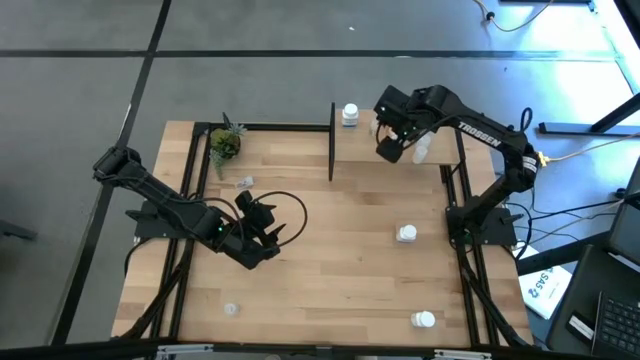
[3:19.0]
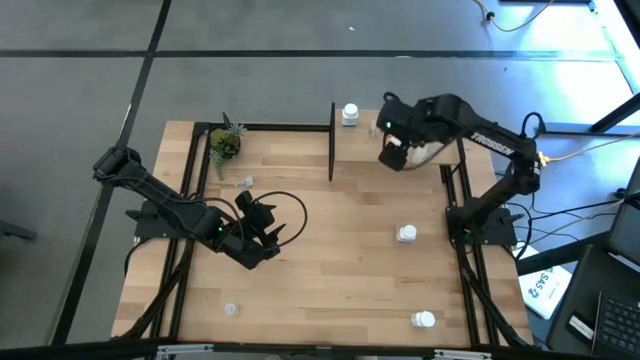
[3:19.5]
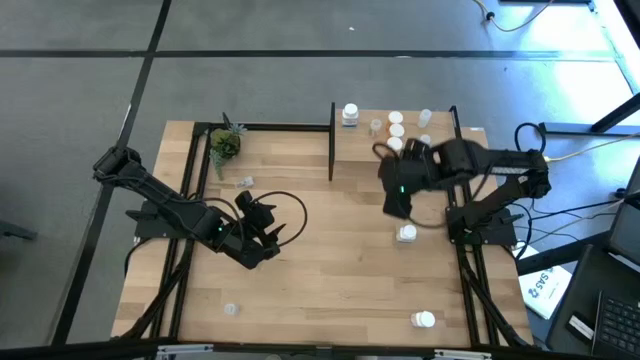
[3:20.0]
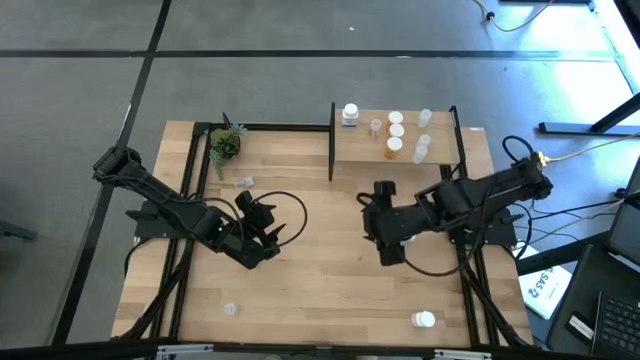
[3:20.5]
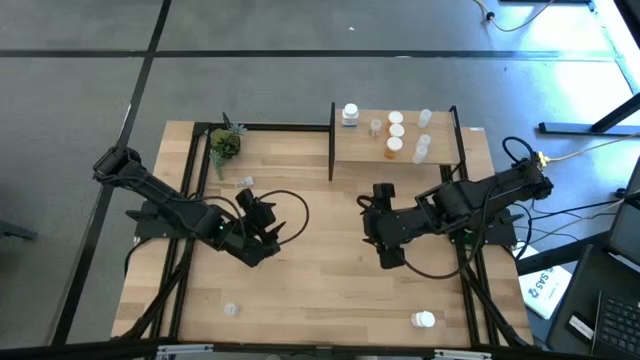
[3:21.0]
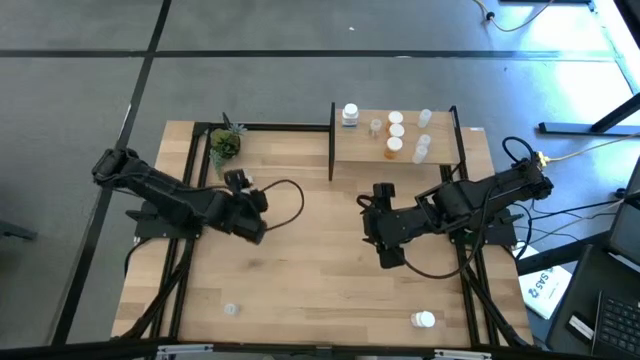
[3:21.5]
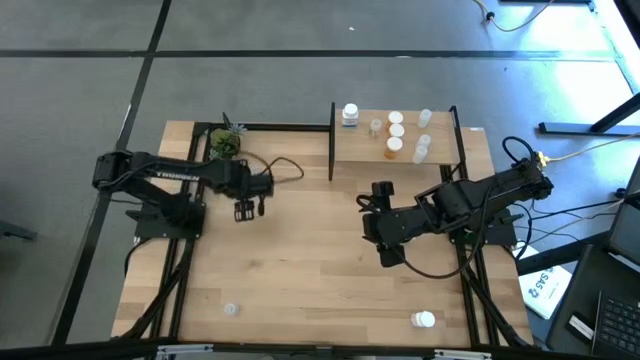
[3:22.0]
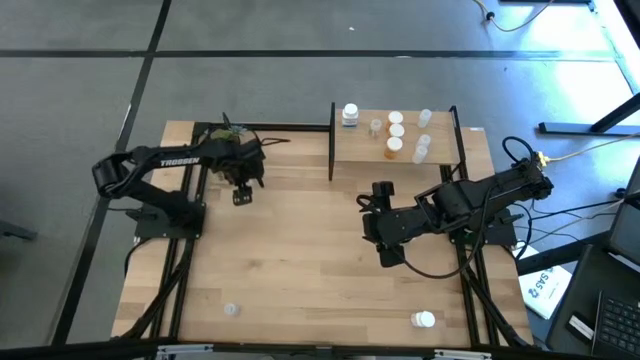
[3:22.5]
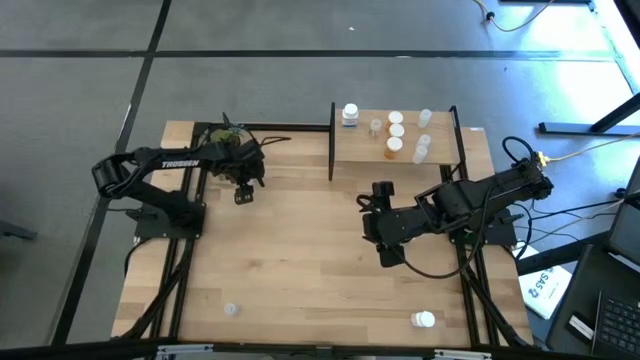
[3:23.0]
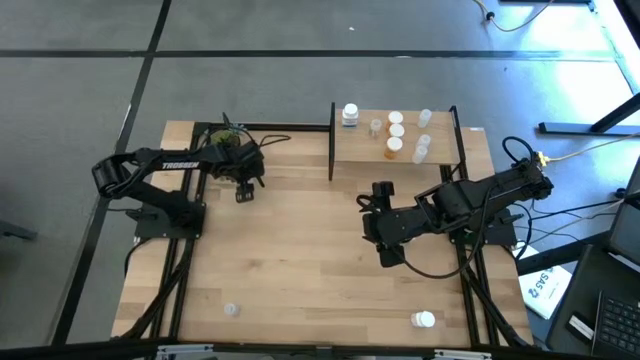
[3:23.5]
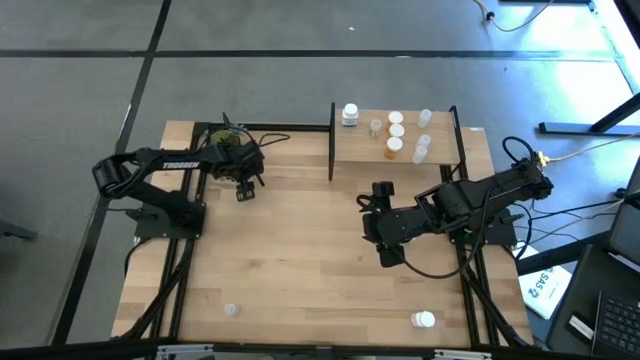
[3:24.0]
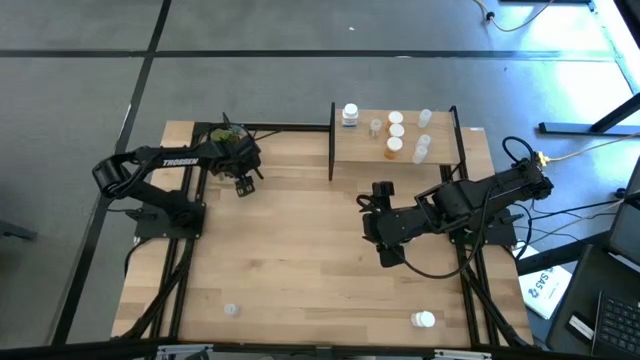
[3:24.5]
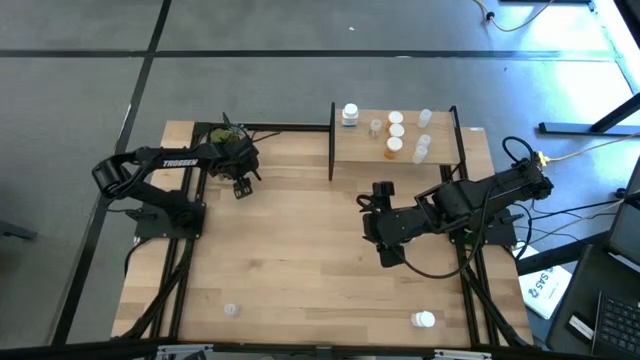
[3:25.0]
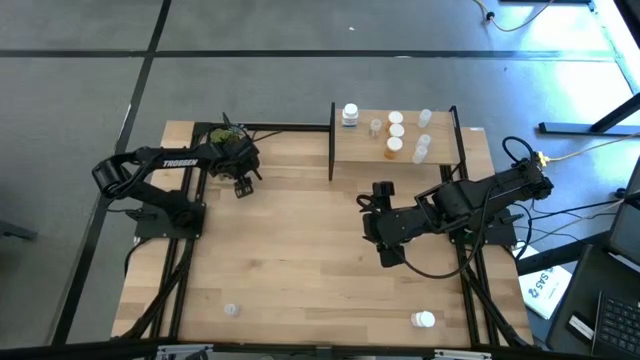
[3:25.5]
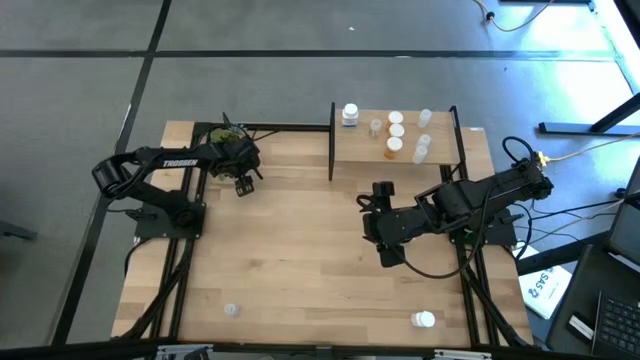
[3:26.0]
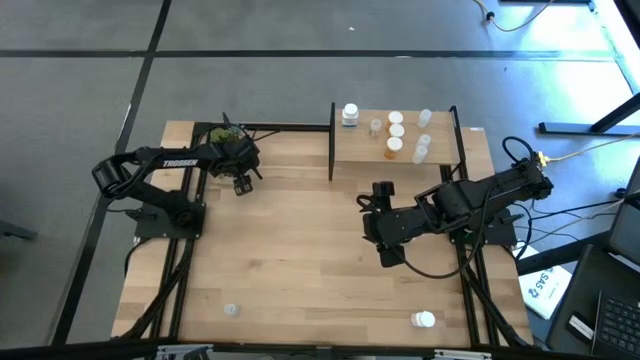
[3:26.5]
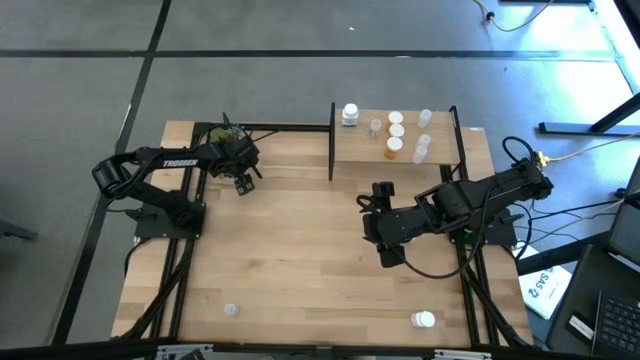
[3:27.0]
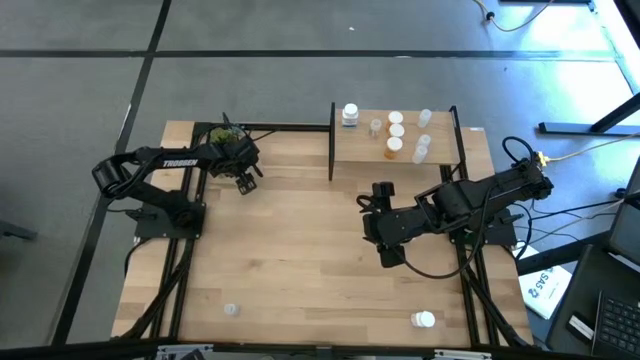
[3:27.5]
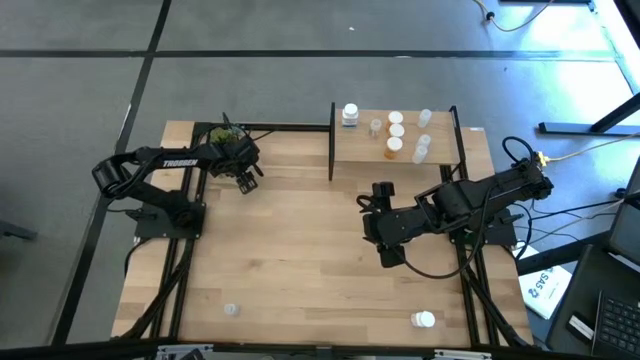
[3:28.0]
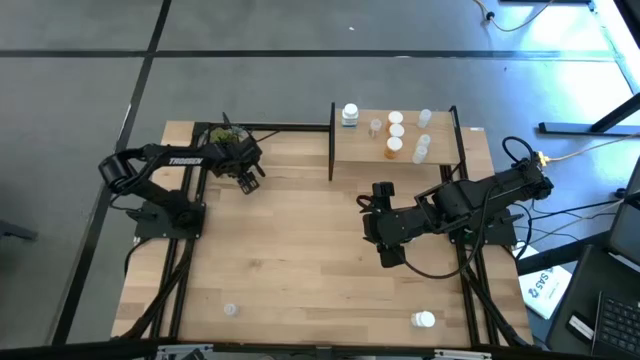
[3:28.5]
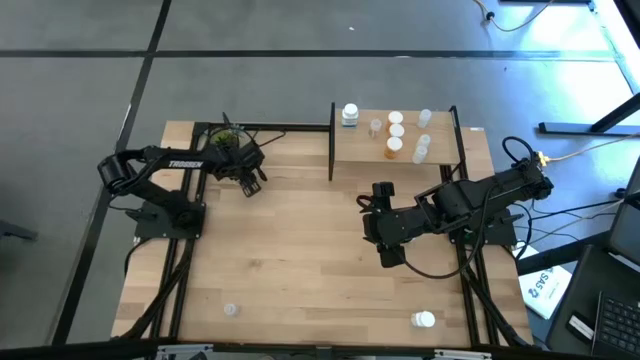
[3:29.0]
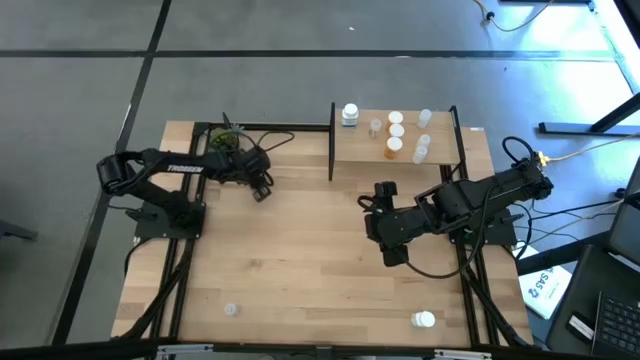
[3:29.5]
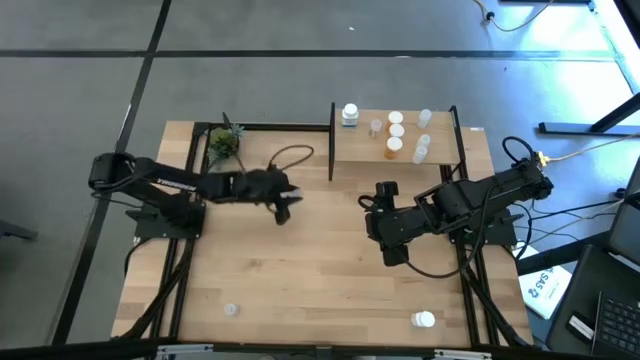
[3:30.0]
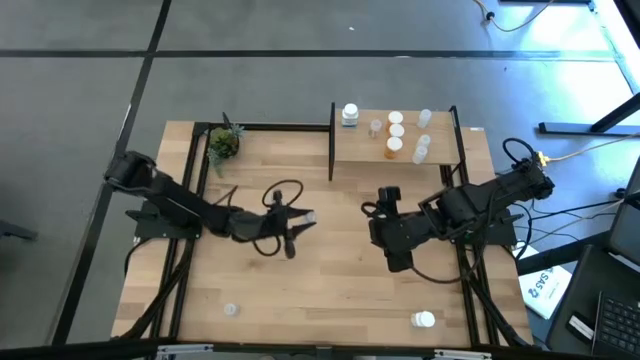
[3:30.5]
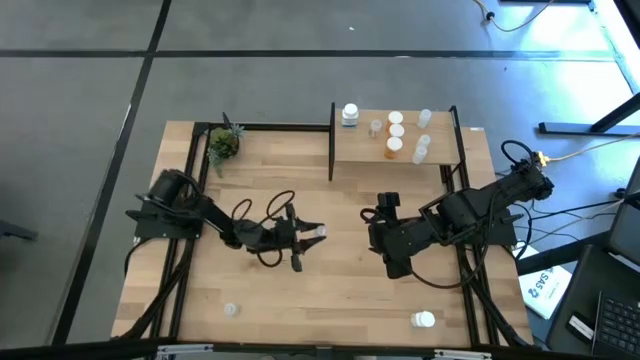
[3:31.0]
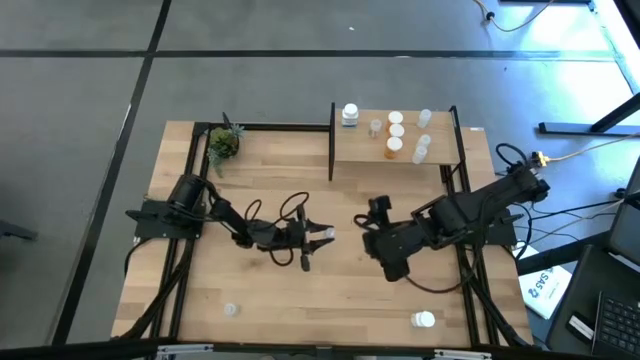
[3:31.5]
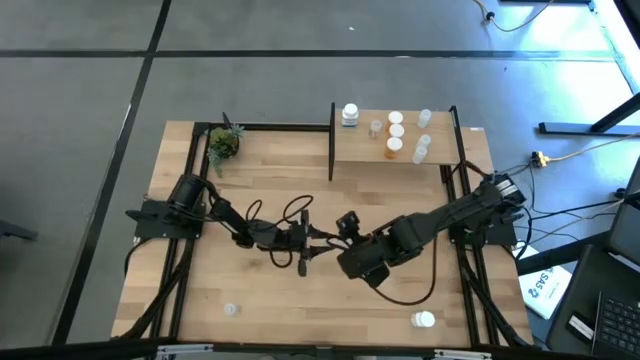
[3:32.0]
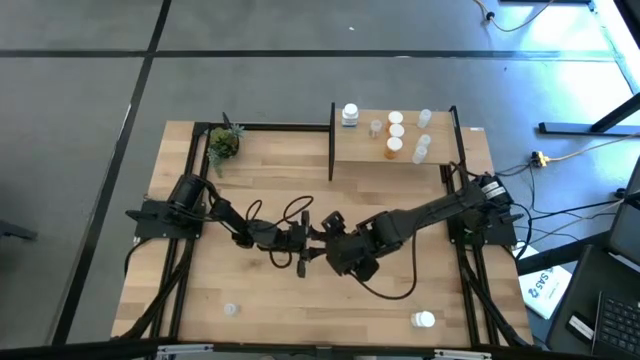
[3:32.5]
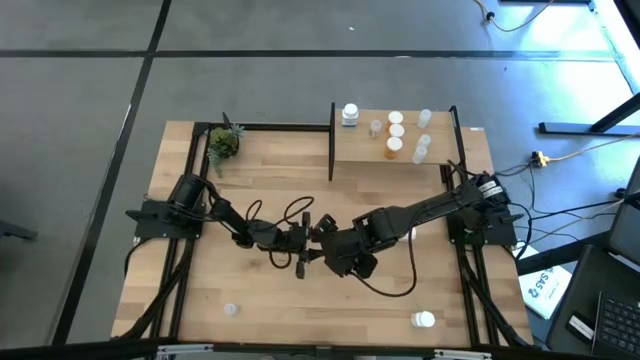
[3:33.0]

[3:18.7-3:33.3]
Task: Pick and place medicine bottles onto shelf by color
Put the top green transparent pill bottle on the shelf aligned with the other green transparent pill bottle

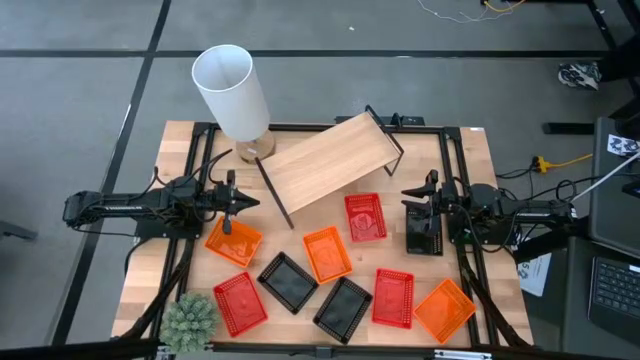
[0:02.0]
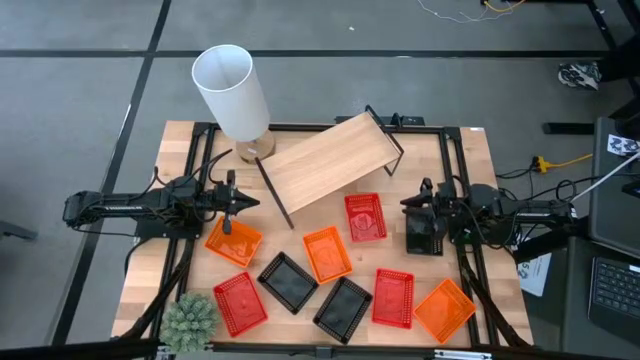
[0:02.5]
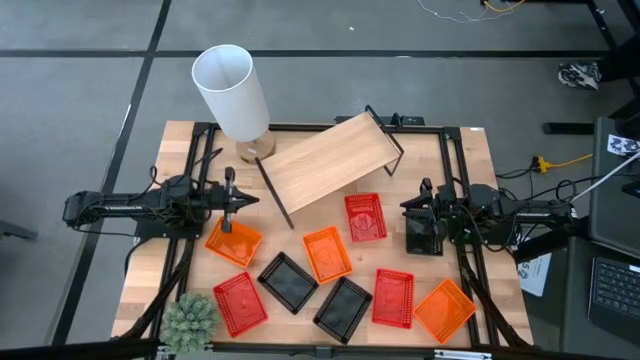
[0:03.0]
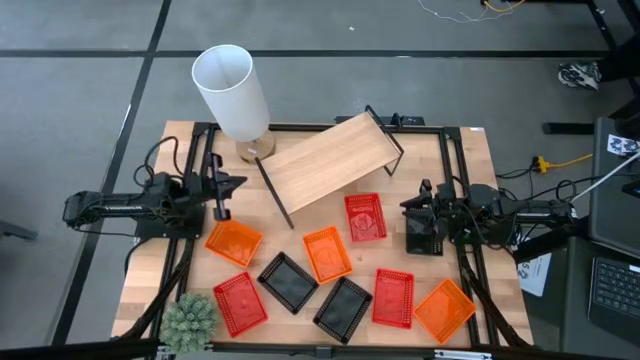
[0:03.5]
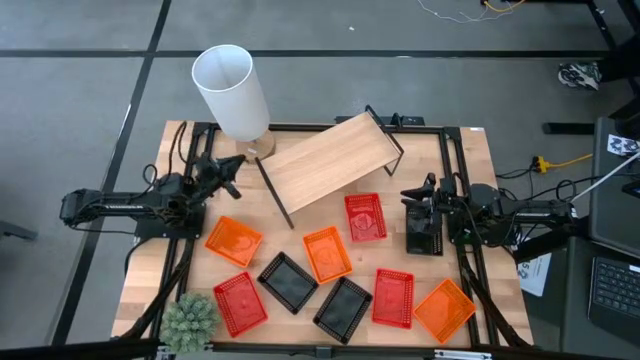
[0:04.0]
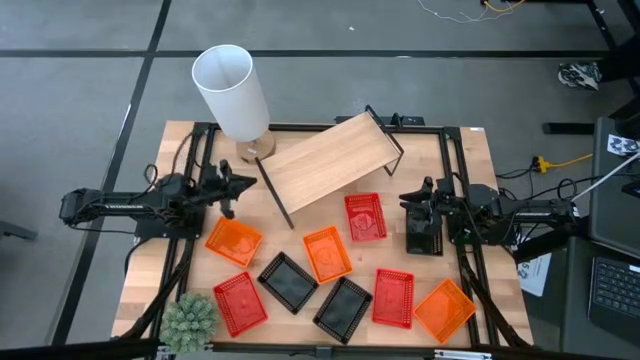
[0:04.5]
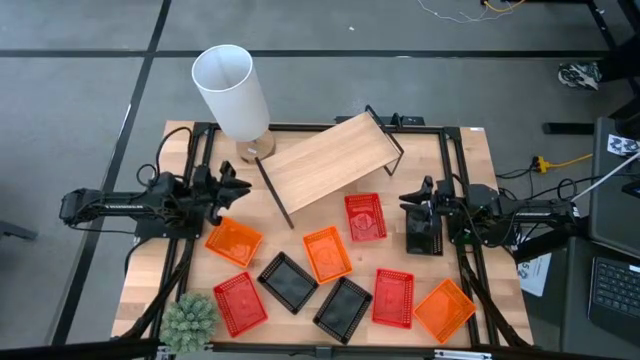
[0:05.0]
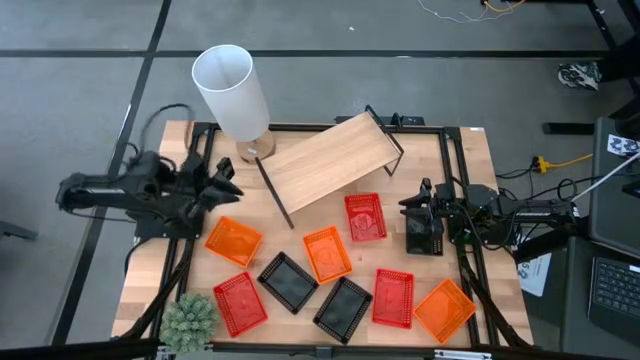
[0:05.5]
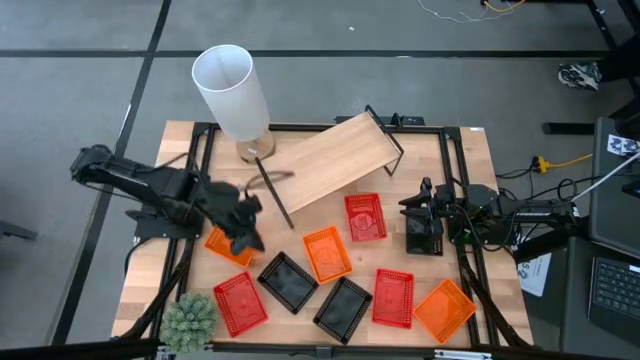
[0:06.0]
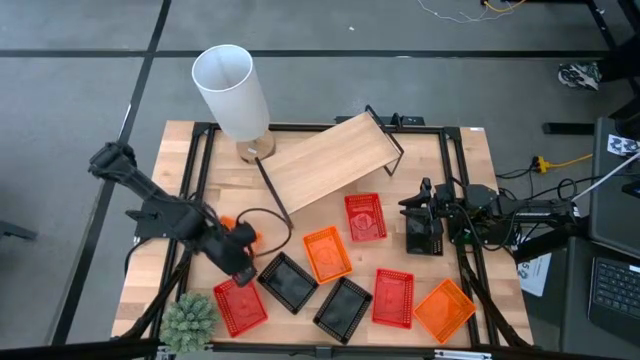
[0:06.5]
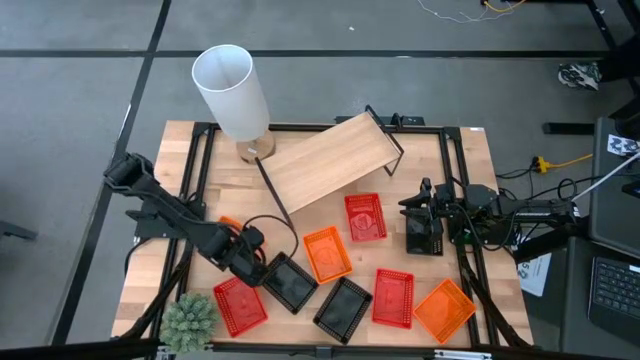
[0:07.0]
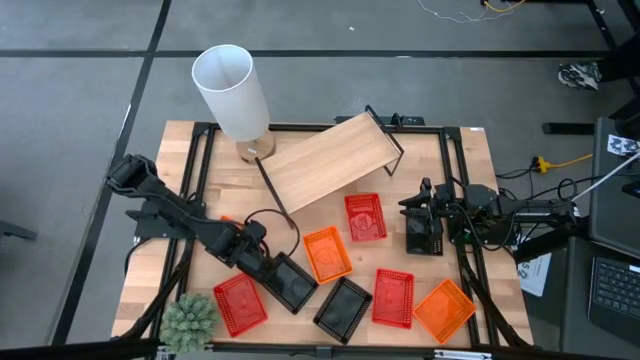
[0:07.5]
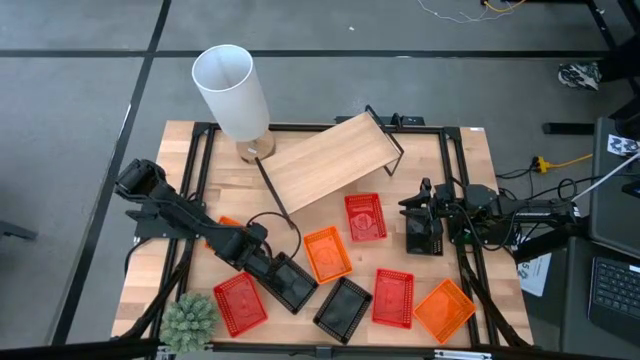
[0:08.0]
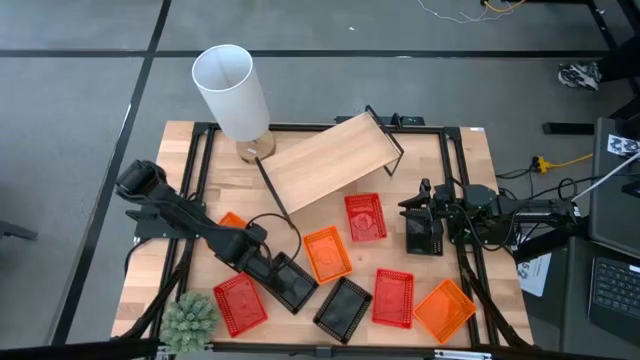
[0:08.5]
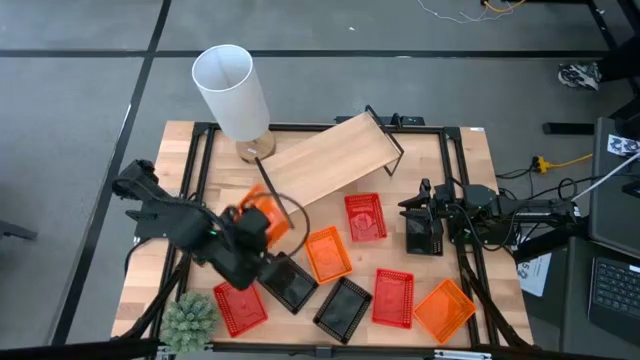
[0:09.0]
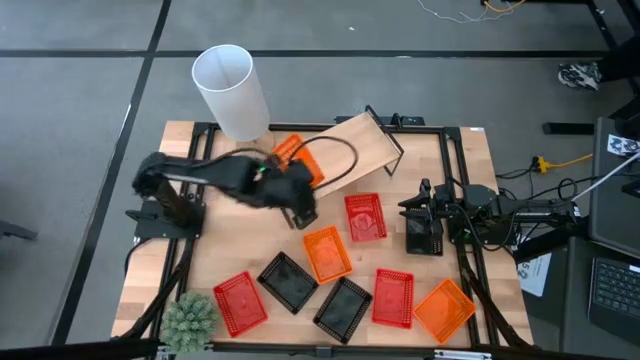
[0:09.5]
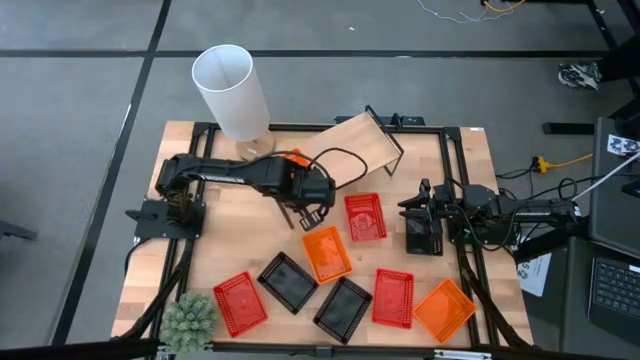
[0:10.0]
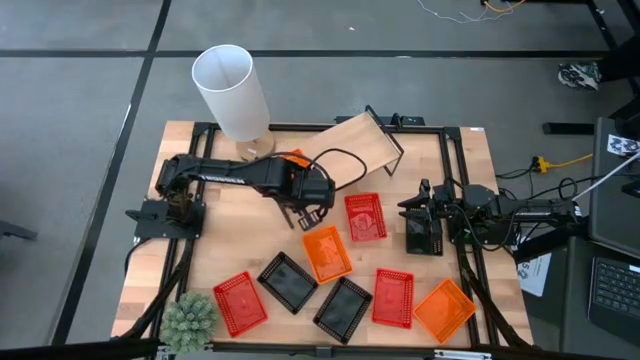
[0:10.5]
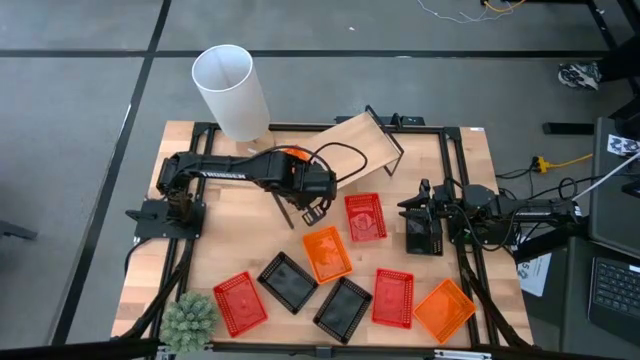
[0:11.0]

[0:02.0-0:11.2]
Task: Stack baskets on shelf by color
Put the top left orange basket on the shelf
